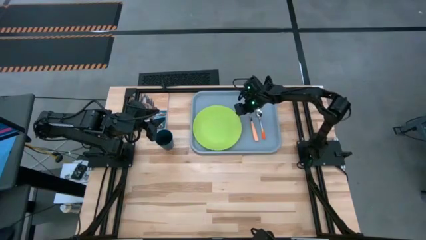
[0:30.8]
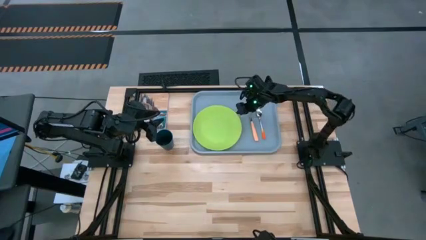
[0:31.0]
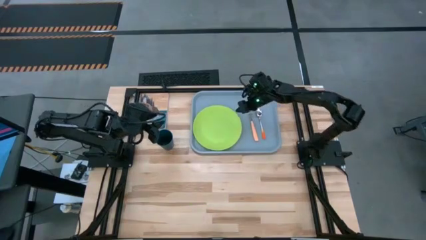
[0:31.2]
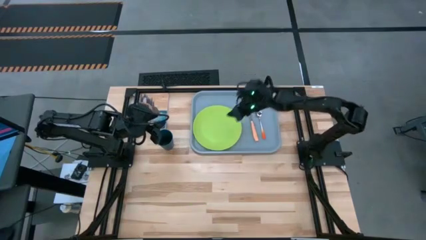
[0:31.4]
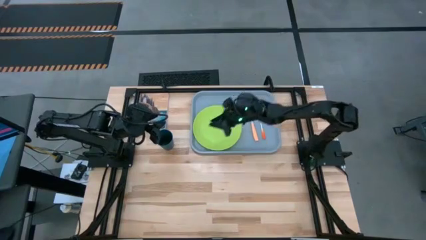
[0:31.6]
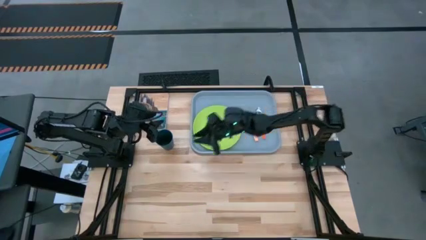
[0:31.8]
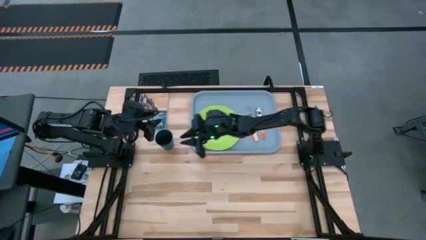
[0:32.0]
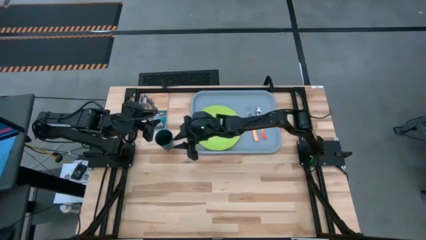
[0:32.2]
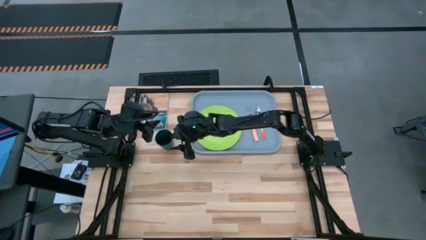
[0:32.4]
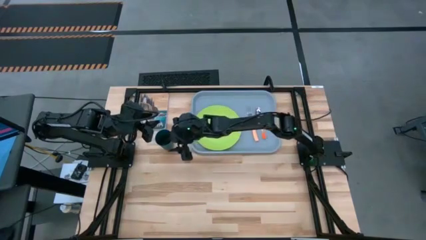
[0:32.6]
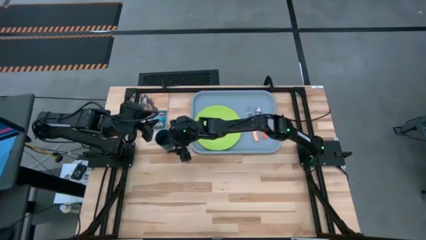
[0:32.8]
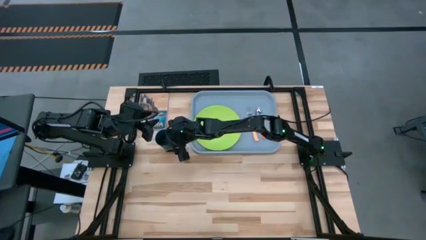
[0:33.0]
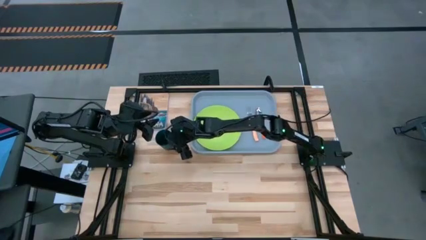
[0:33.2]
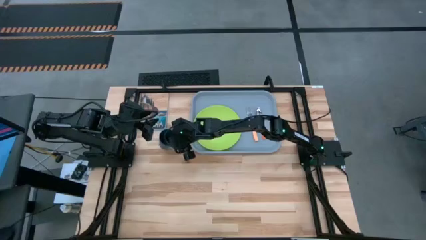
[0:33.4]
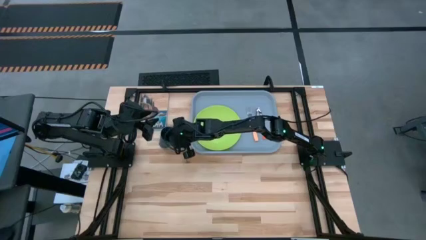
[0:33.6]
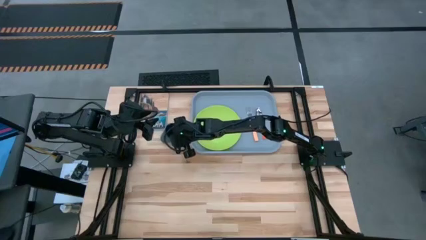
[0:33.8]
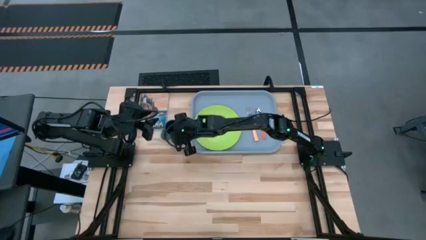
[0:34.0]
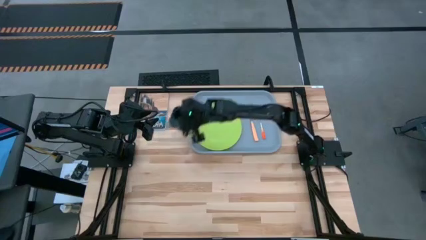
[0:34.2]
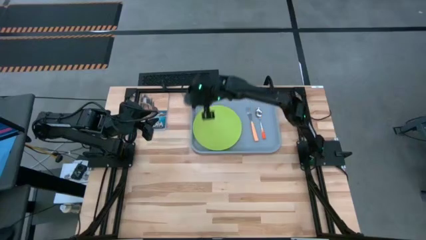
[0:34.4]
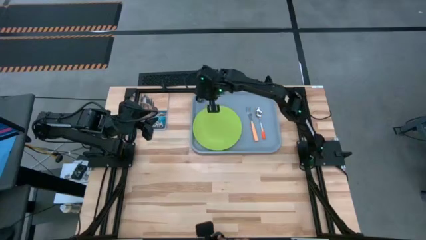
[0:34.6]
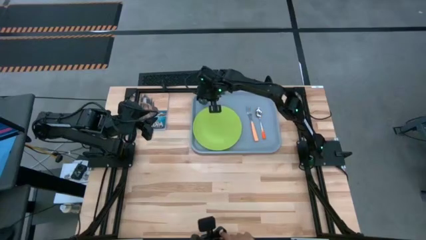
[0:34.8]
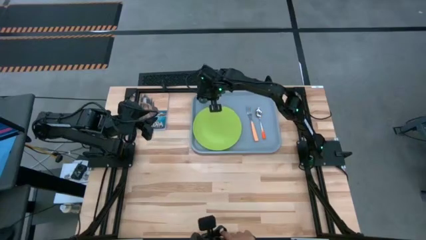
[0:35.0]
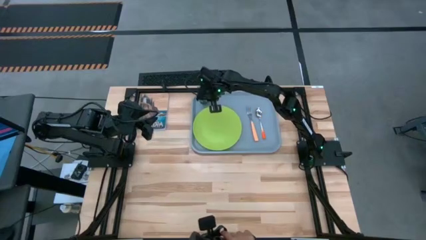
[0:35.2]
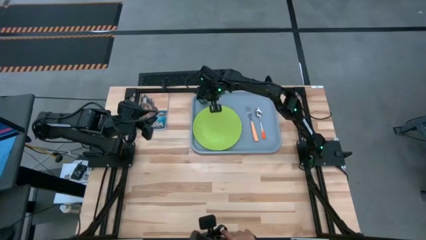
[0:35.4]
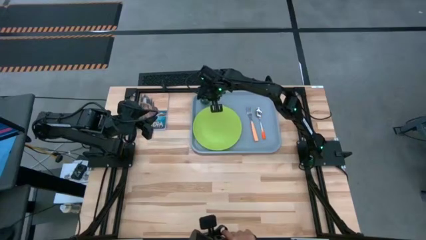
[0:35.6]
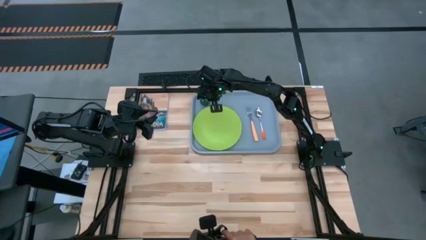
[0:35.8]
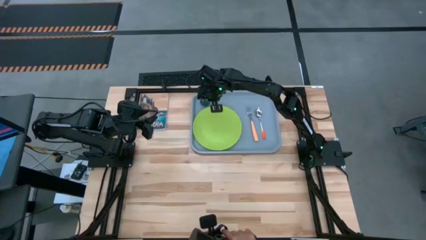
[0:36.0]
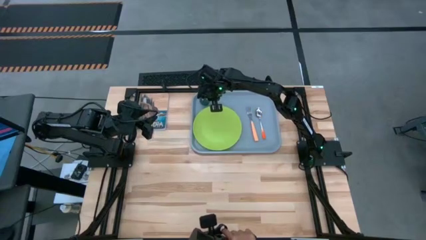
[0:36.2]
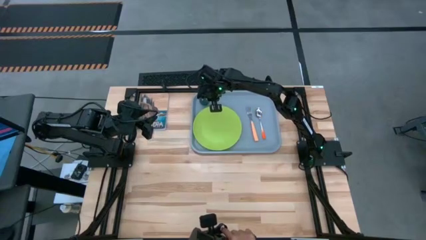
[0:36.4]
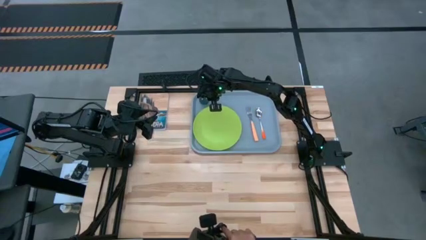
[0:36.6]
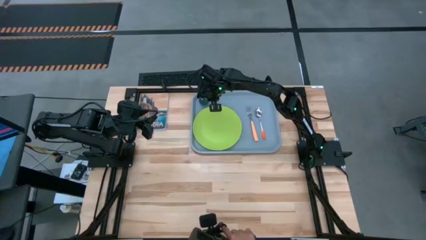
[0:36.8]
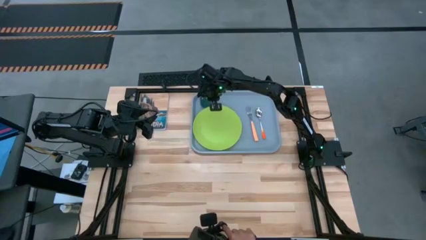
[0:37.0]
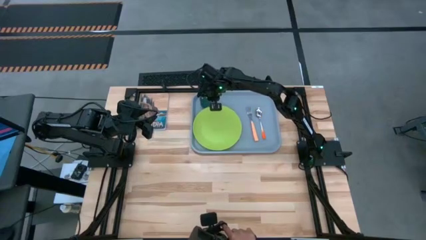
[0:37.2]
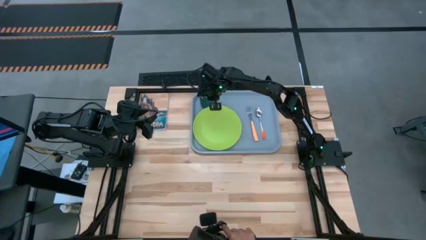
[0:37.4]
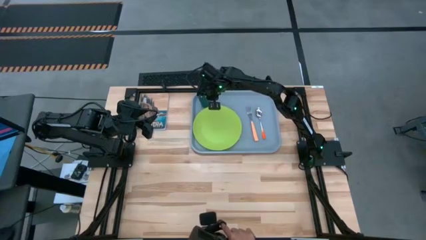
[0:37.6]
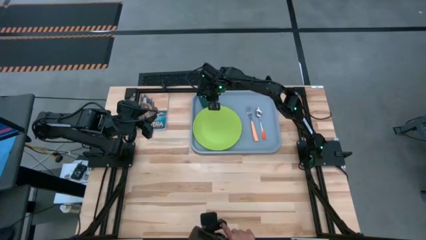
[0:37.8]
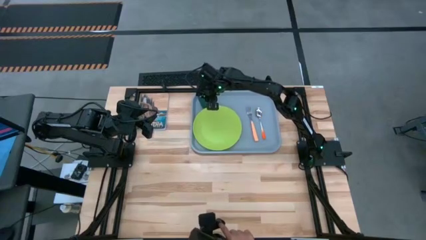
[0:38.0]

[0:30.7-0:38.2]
Task: Pick and place plate/cup/fork/spoon on tray
Put the blue cup on the gray tray to the top left of the green plate

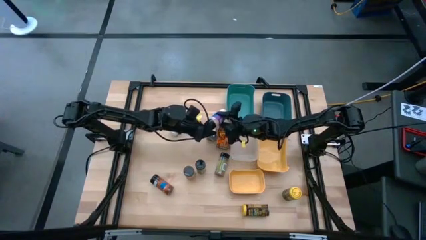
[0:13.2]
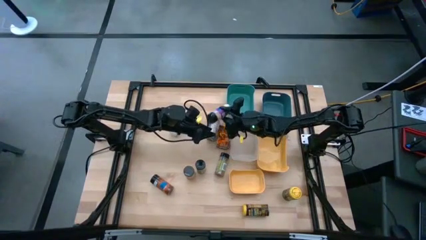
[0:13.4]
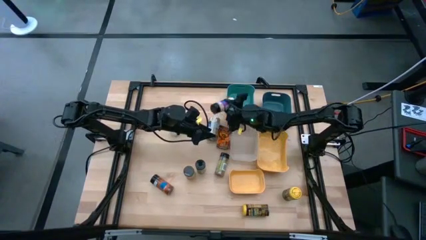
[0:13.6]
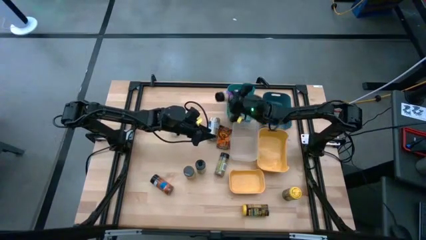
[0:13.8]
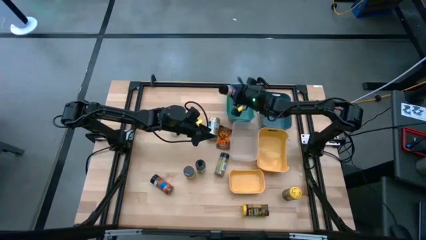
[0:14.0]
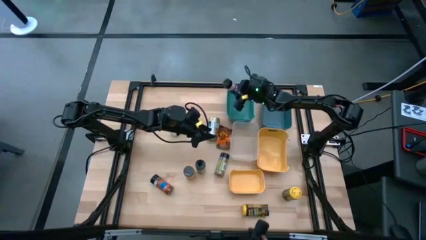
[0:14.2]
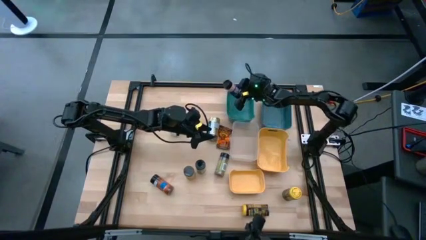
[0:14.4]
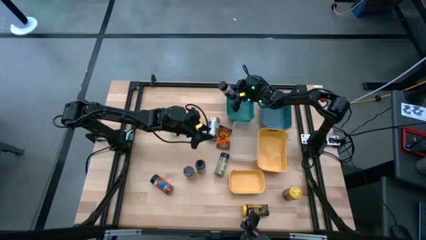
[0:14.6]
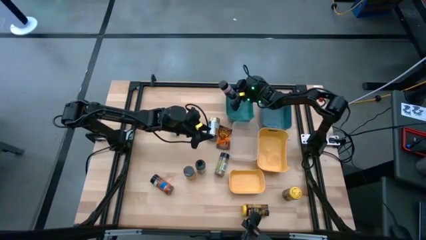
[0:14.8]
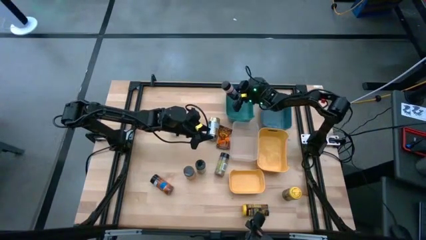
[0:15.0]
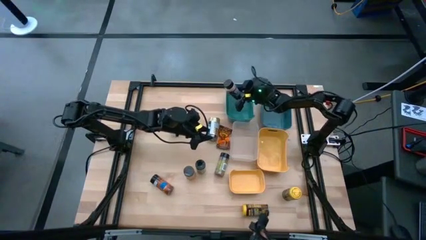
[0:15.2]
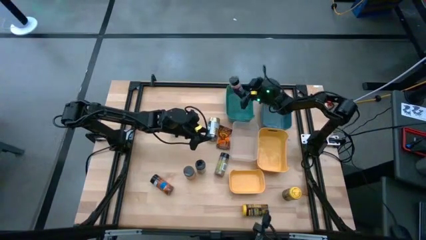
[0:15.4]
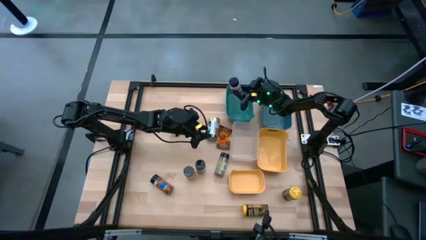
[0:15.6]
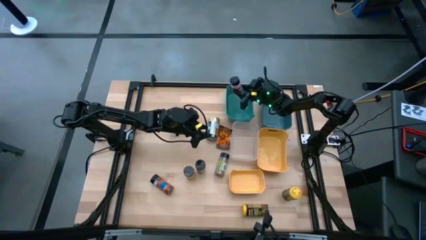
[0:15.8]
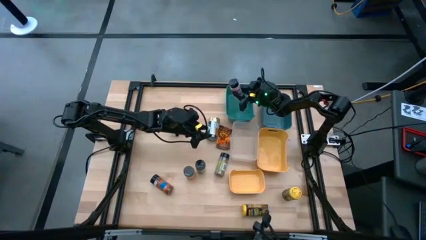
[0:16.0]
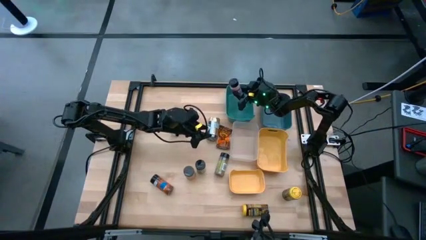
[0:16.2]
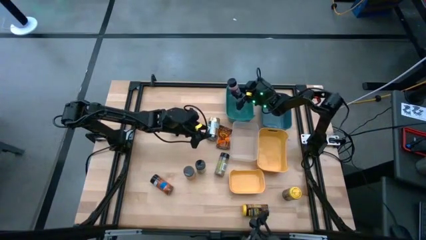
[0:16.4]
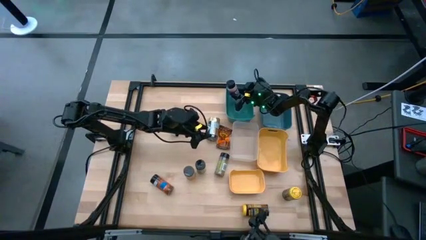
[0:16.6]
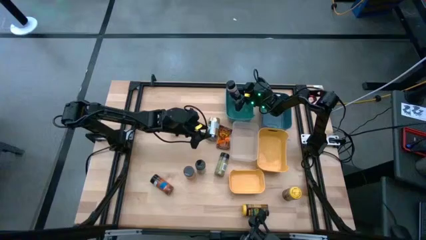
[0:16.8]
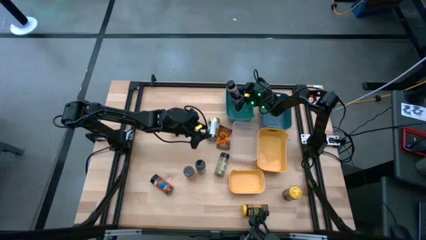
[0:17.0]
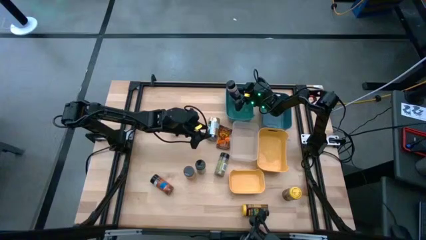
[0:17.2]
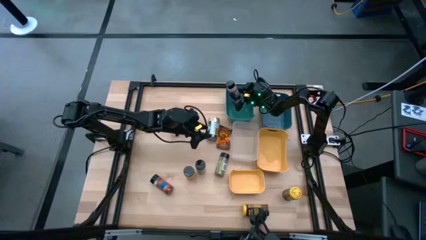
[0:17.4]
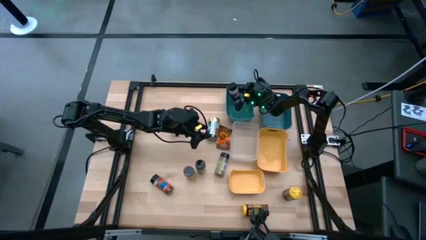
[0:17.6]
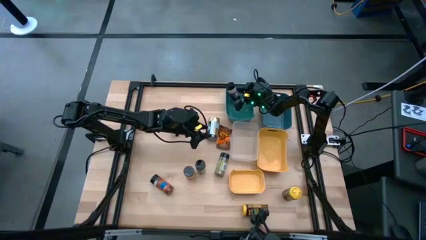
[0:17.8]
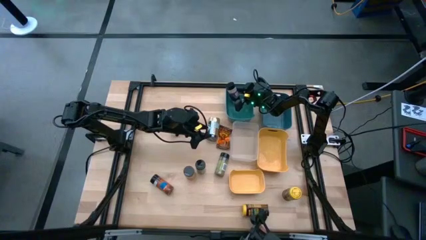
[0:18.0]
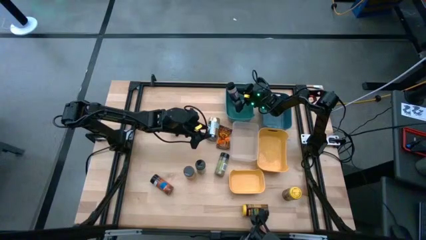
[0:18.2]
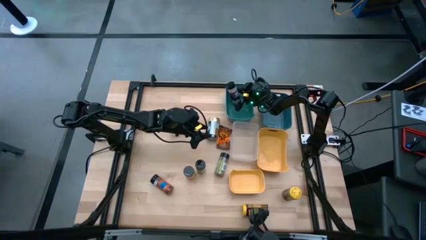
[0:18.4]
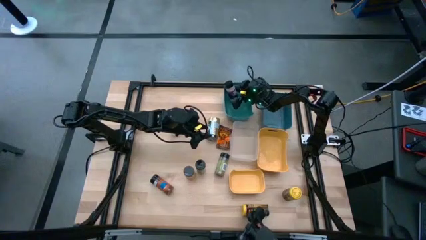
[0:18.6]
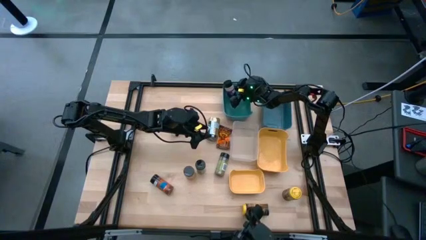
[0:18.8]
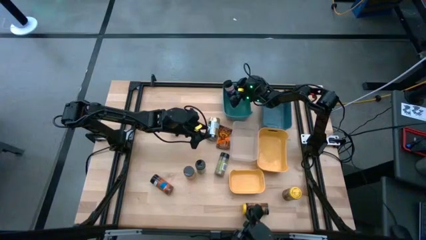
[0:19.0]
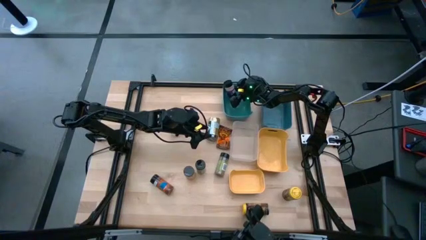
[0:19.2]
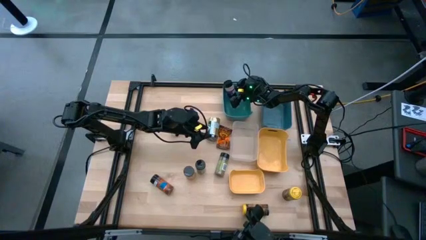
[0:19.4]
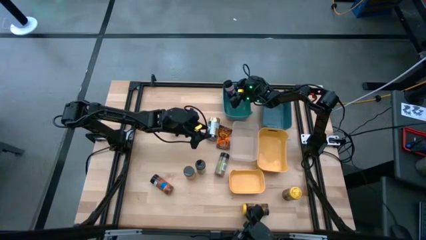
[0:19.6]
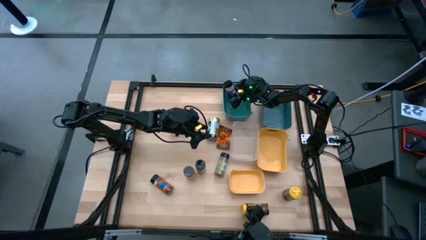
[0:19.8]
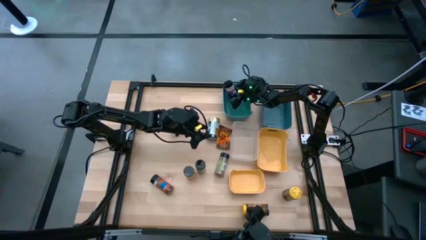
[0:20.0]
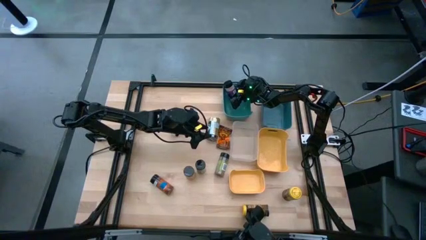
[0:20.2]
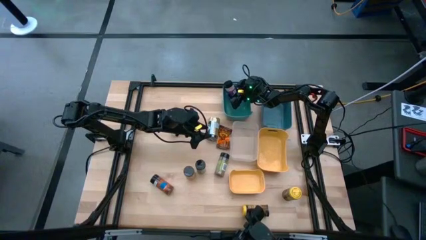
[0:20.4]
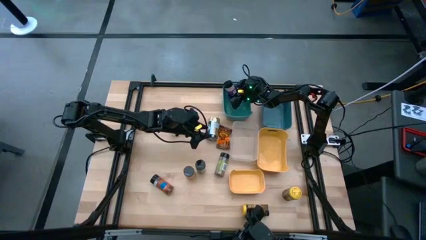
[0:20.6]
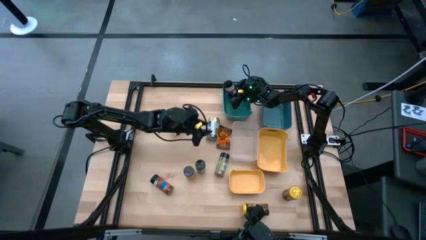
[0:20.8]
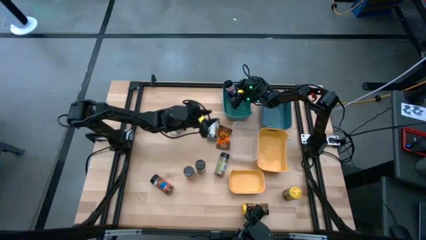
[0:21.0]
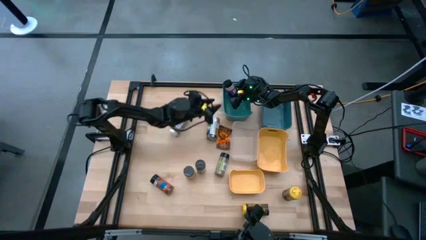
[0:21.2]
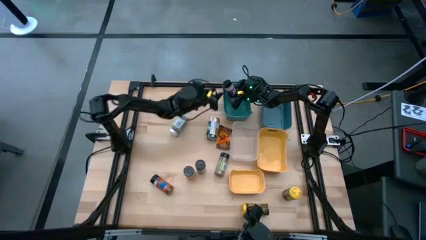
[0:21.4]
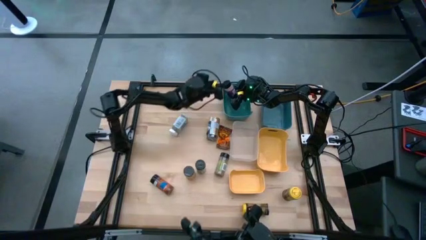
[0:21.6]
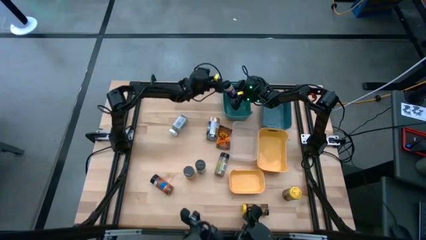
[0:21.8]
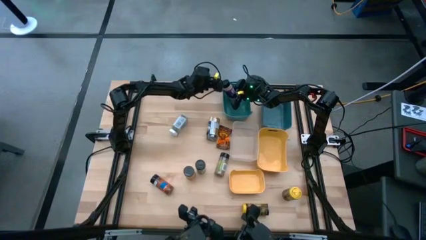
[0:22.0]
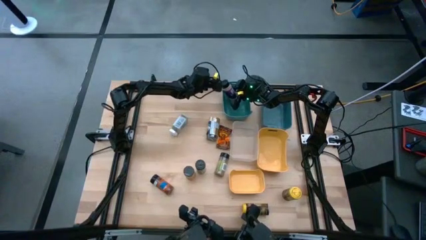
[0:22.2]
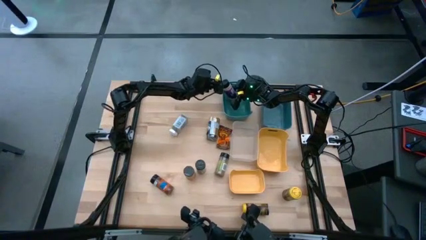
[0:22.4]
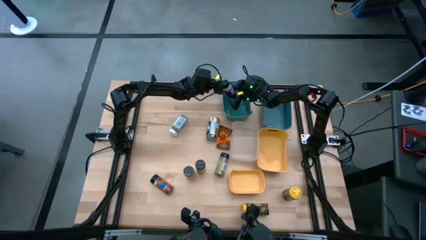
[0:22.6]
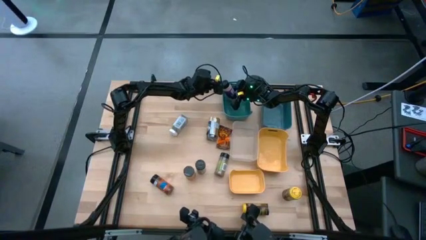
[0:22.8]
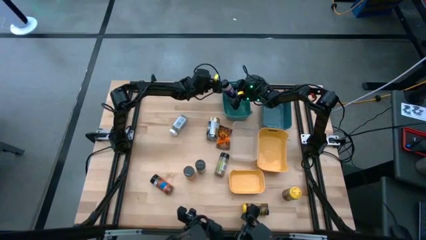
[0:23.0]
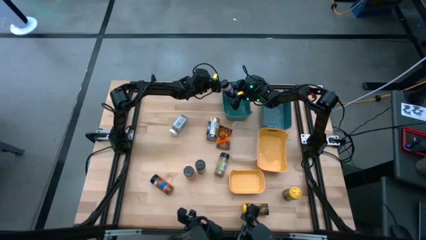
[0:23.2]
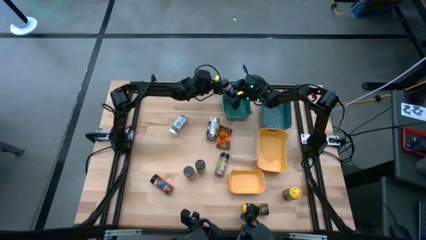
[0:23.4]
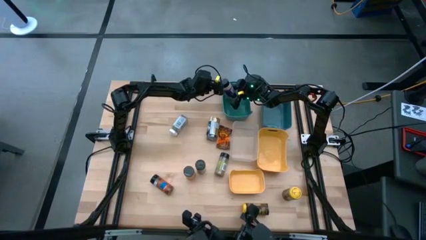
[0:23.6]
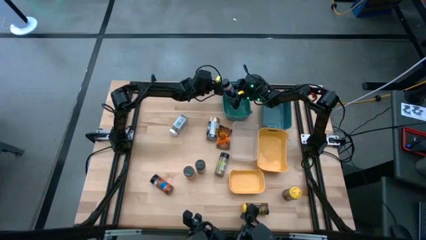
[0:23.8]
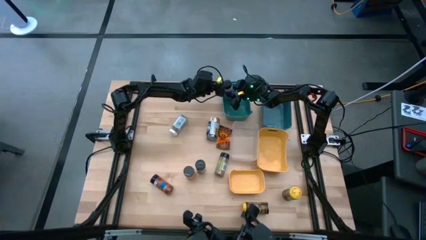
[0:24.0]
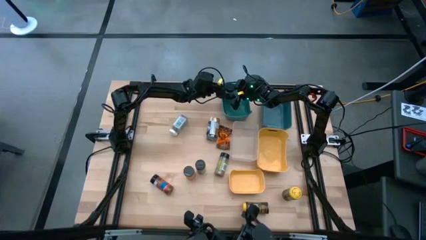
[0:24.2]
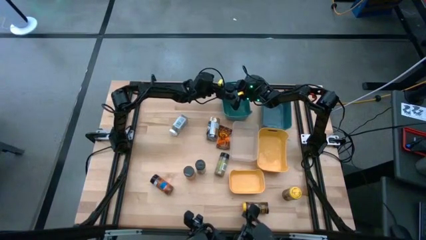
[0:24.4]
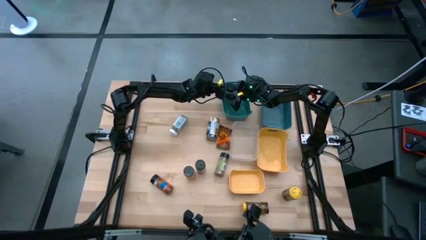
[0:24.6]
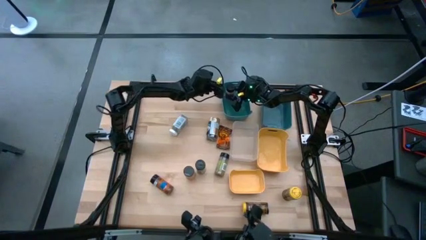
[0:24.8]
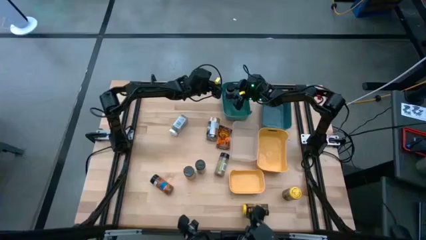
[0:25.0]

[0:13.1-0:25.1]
Task: Sort spices by type
Put the purple seasoning into the green bin
